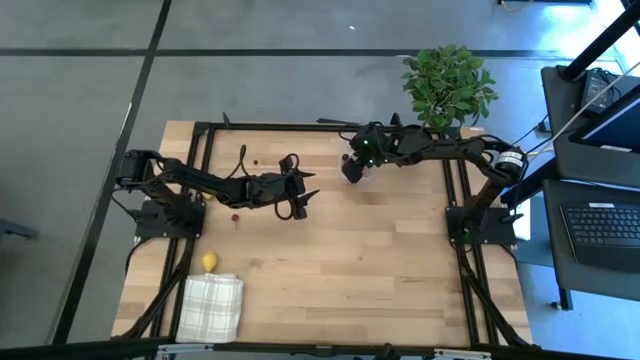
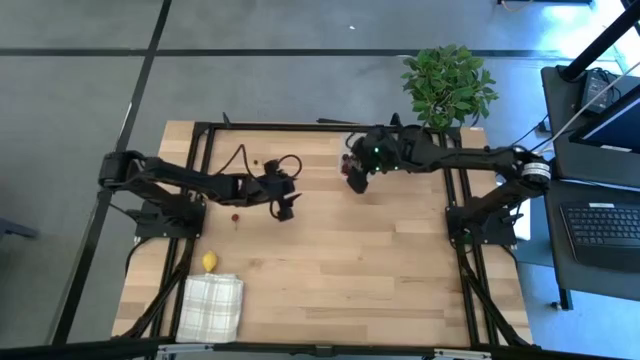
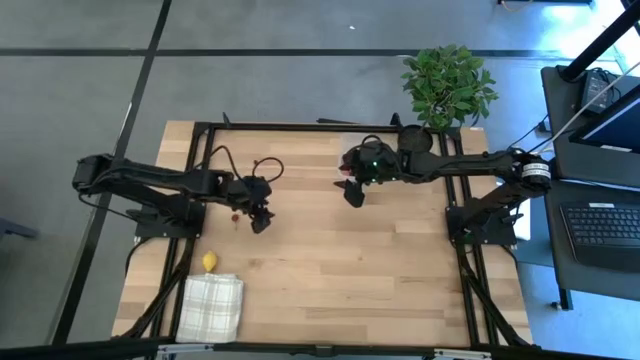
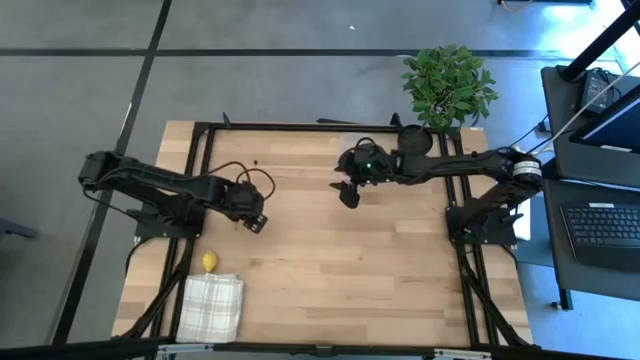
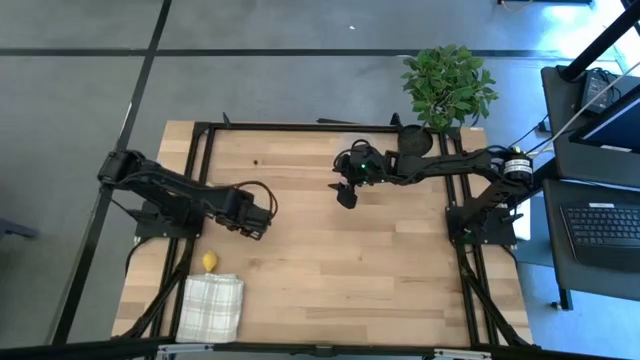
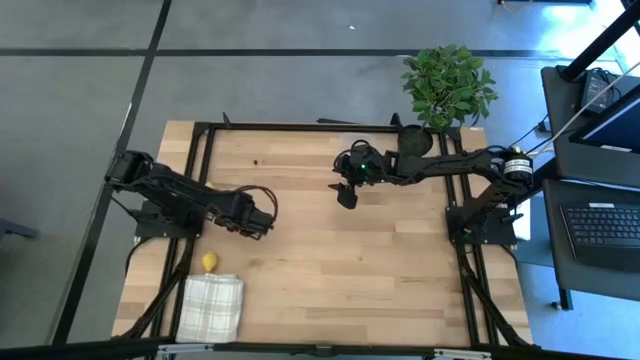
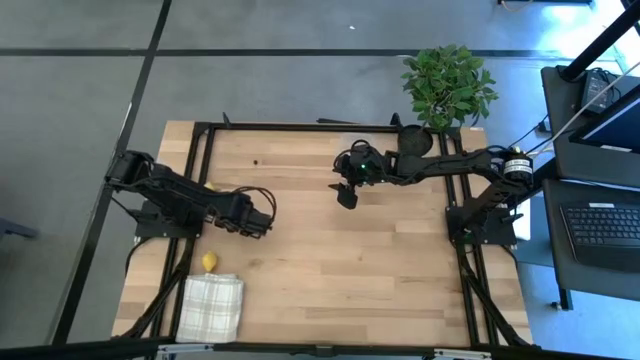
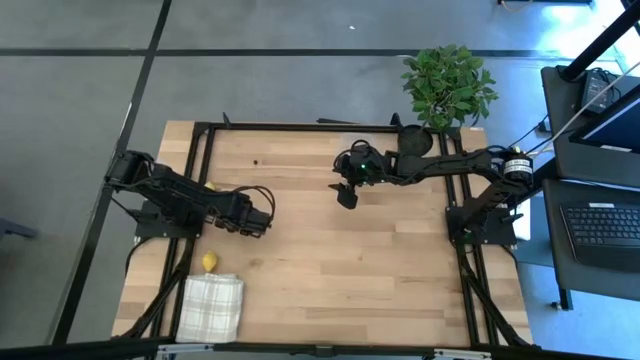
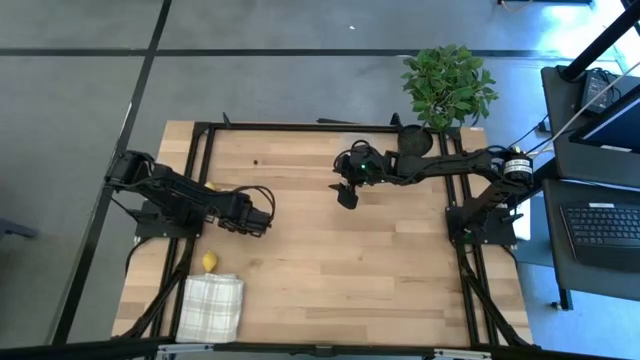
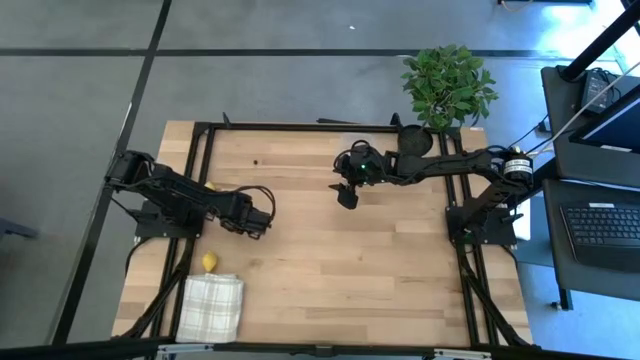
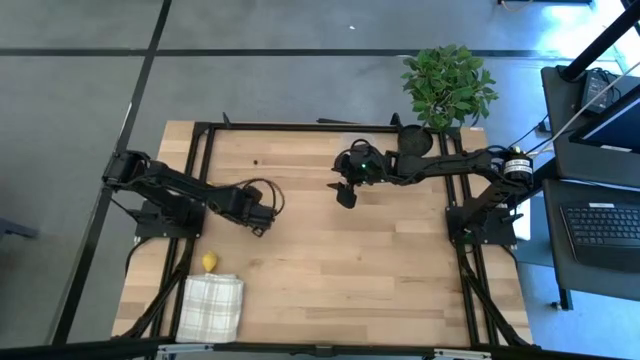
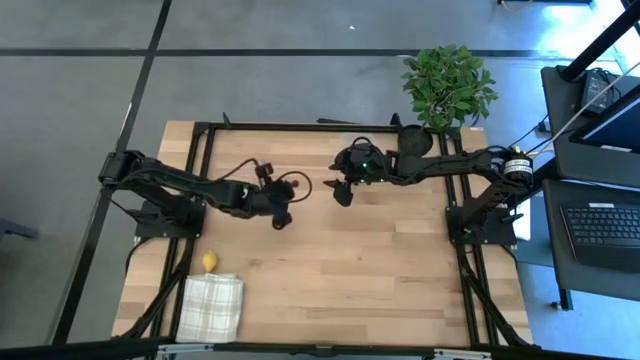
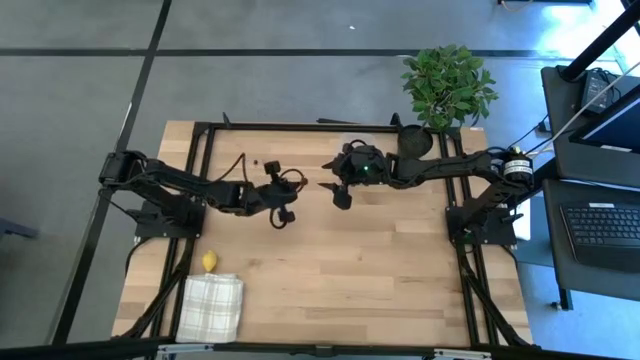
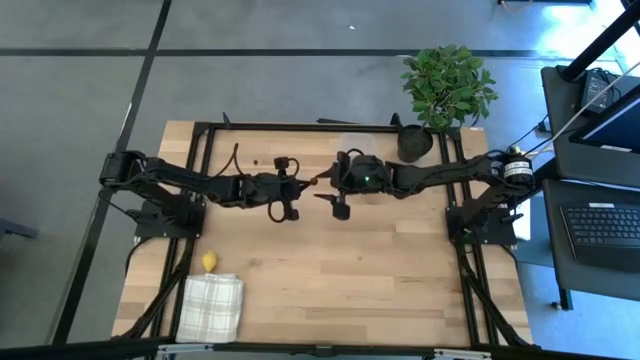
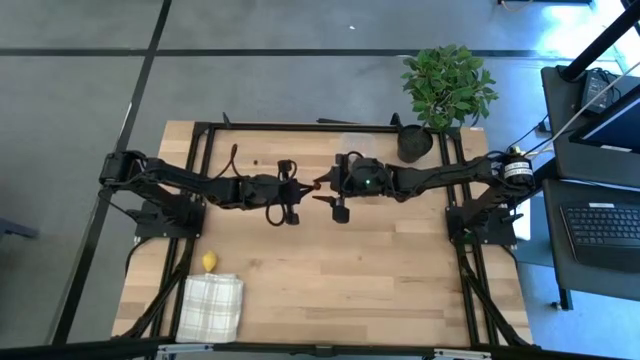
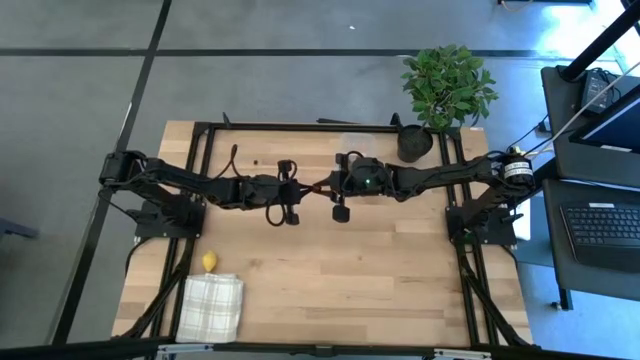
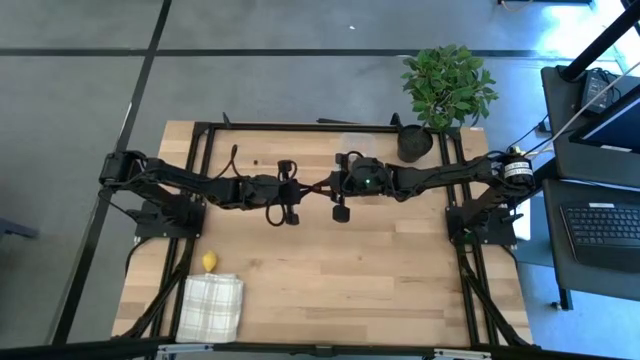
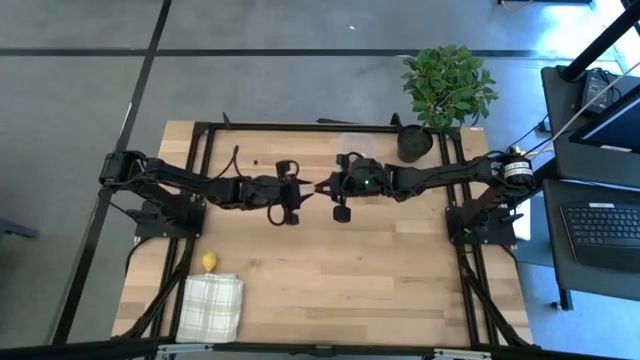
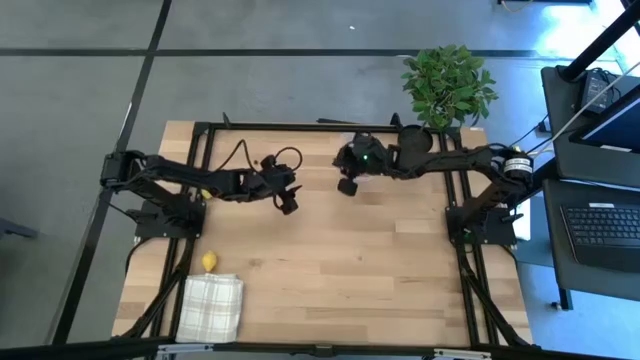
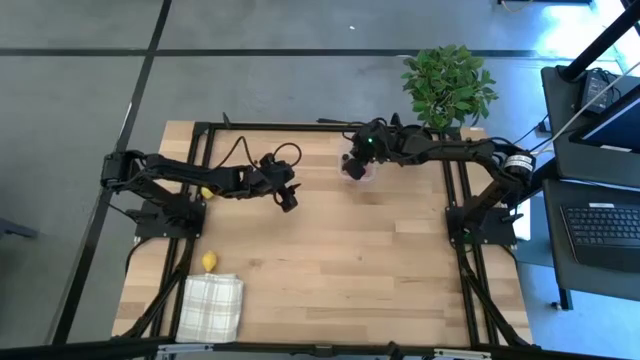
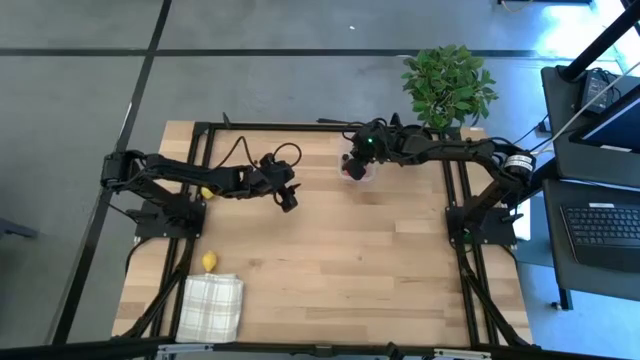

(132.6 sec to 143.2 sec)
Task: Pick and placing Produce into tupperware
Put the red cherry into the transparent bin

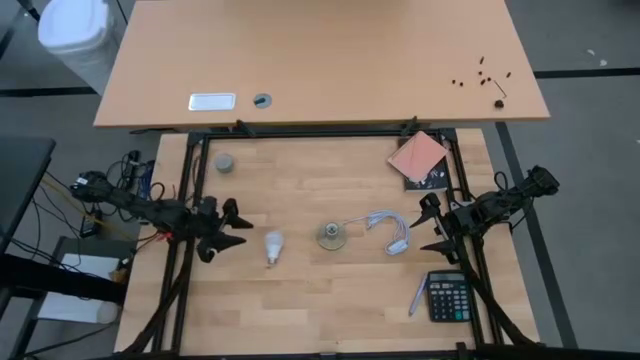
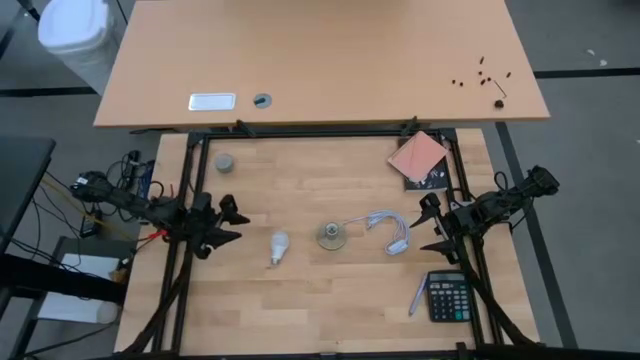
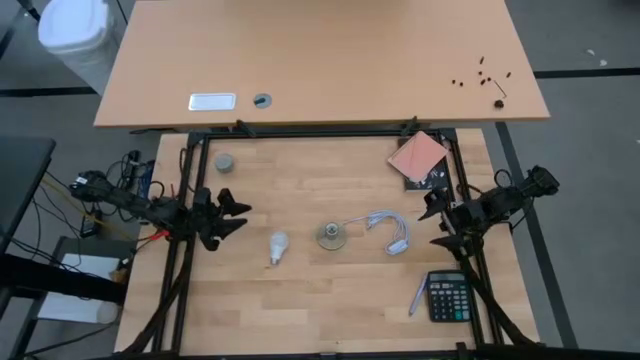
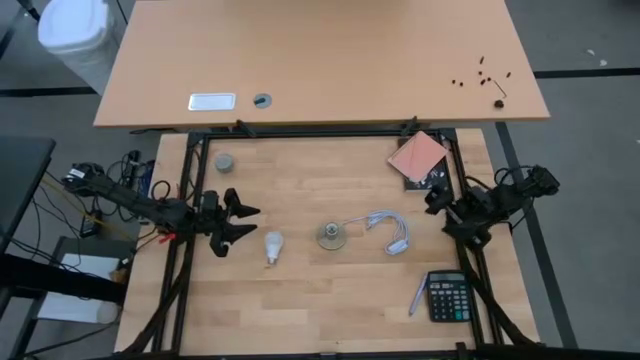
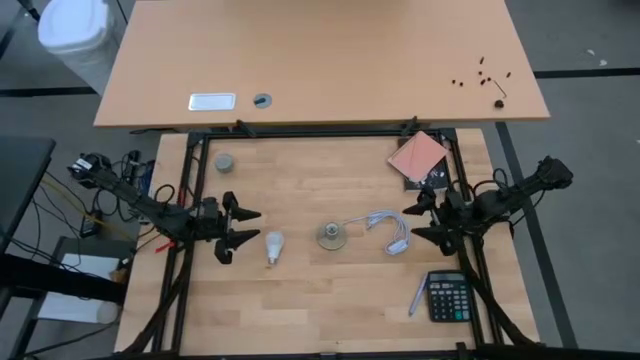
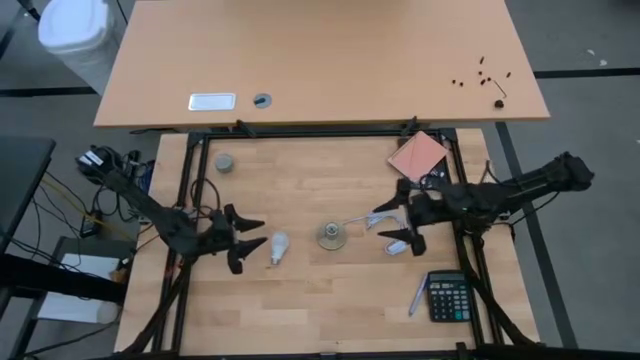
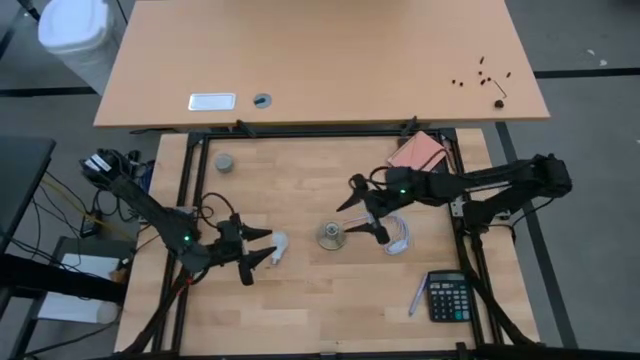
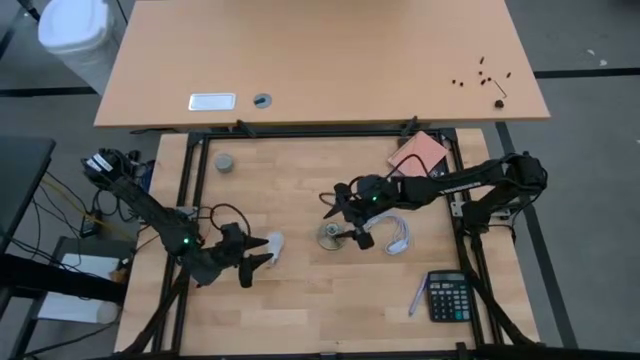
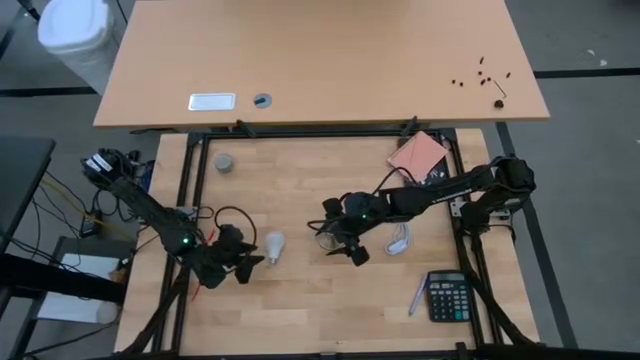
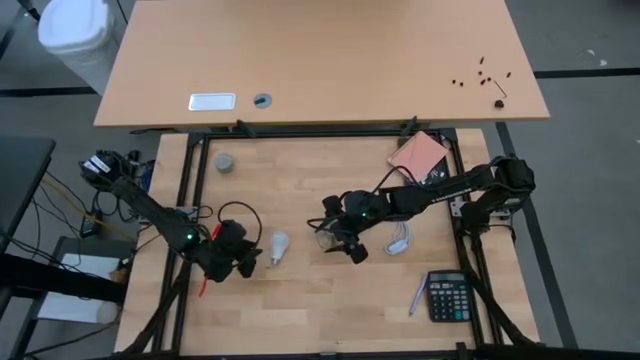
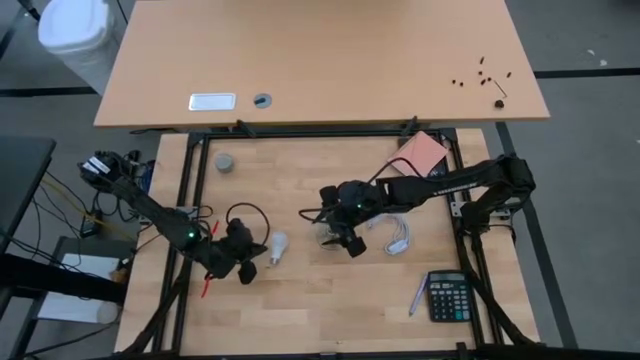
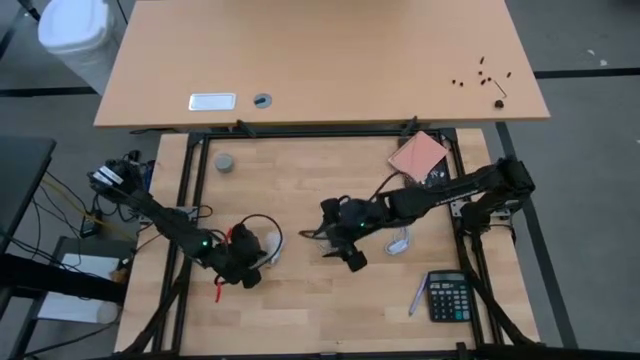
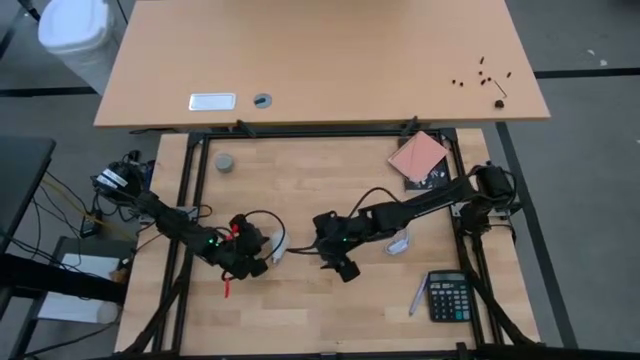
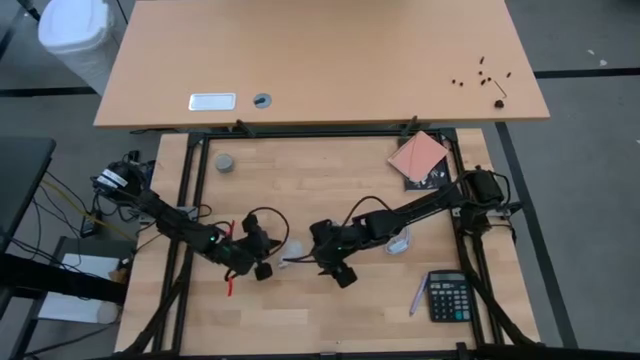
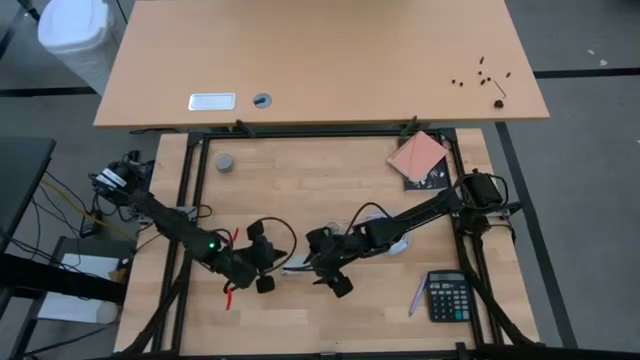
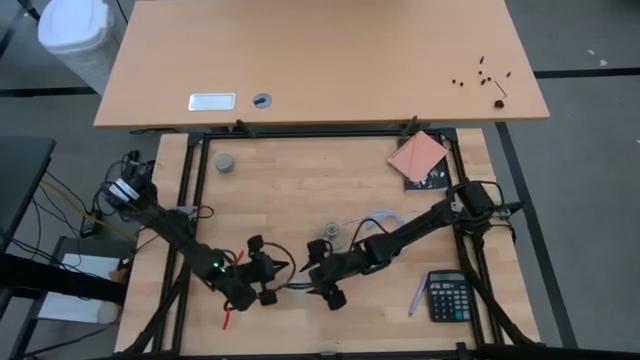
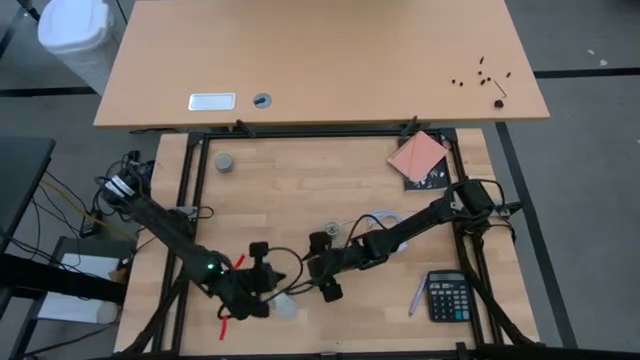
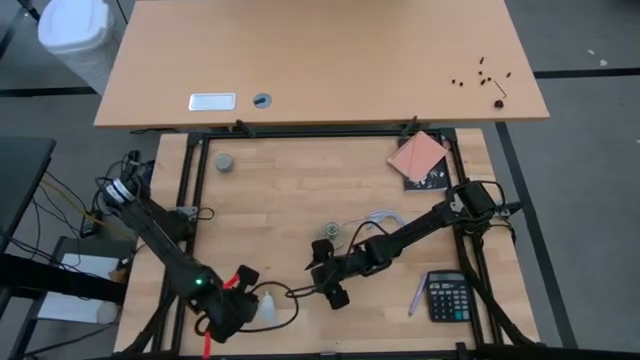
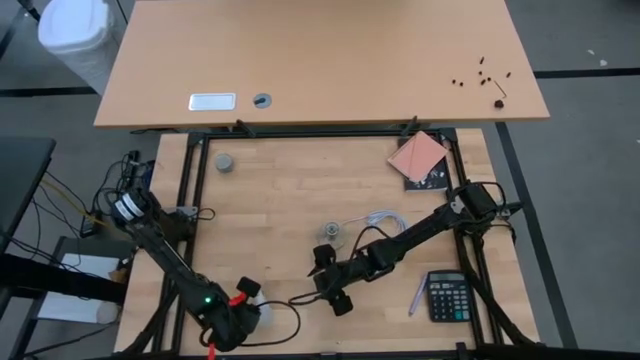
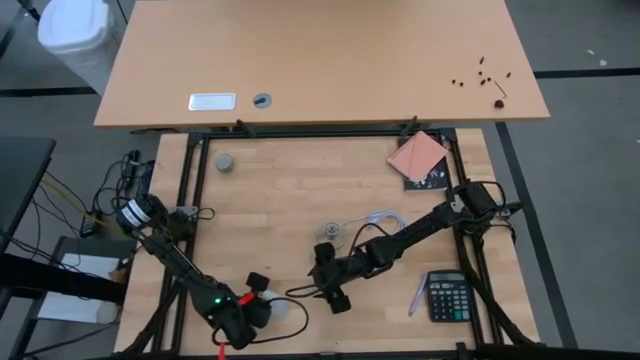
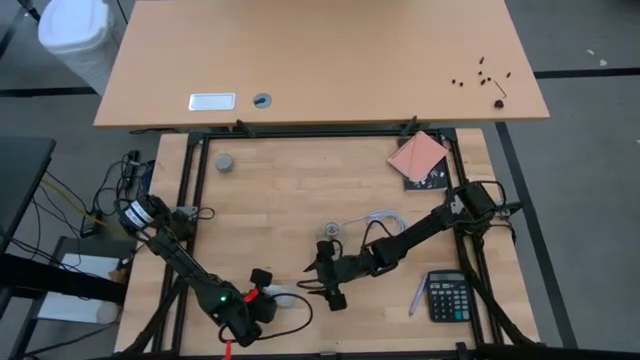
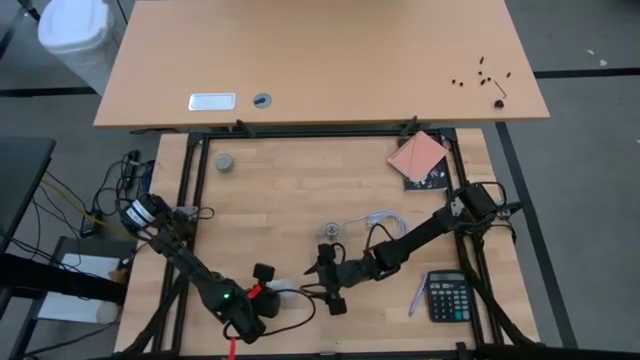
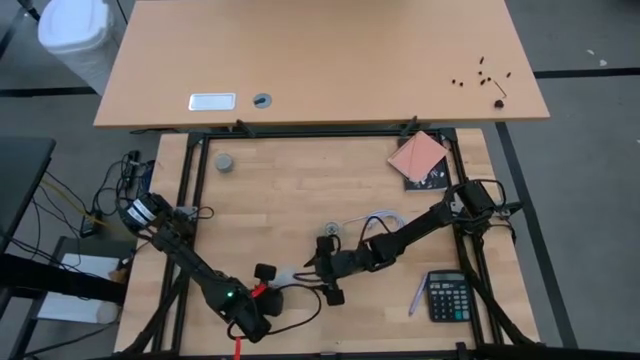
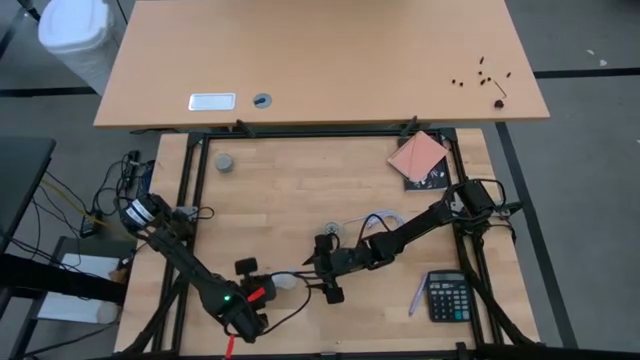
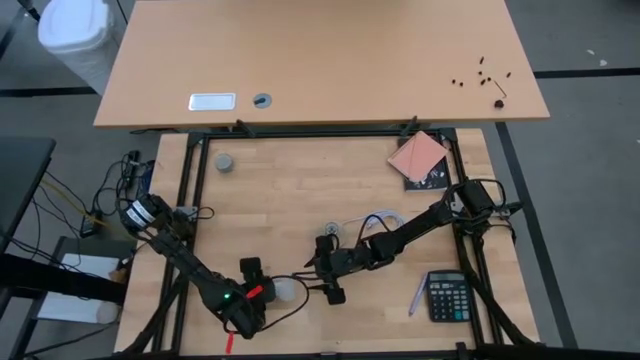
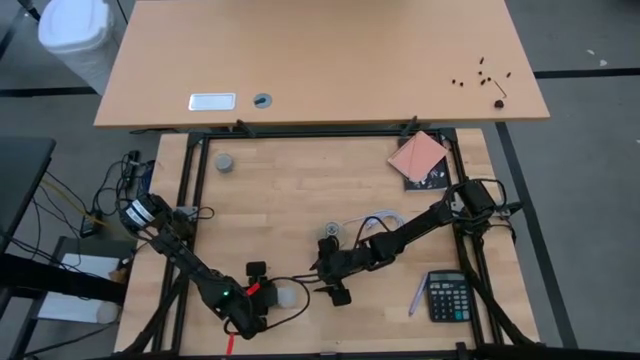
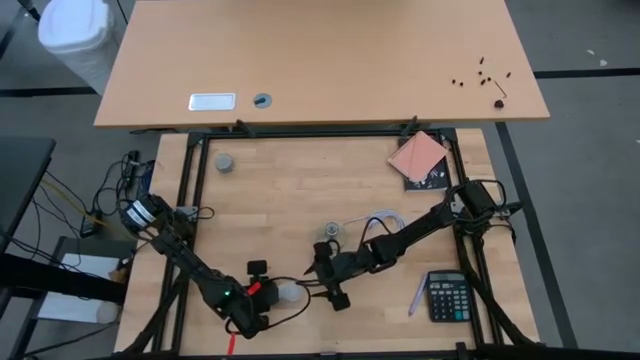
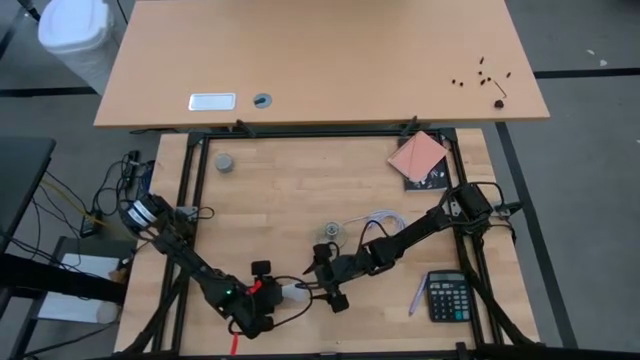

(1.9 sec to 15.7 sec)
Task: Screw lightbulb
Insert the white lightbulb into the golden lamp
